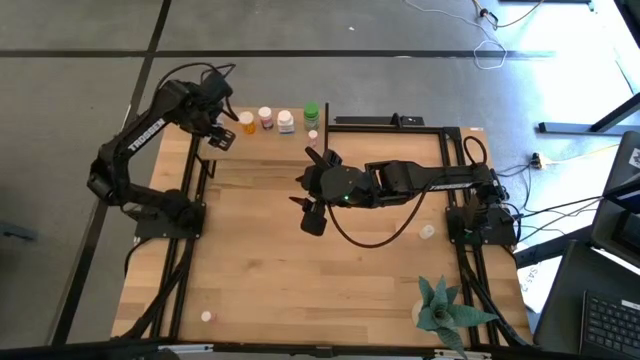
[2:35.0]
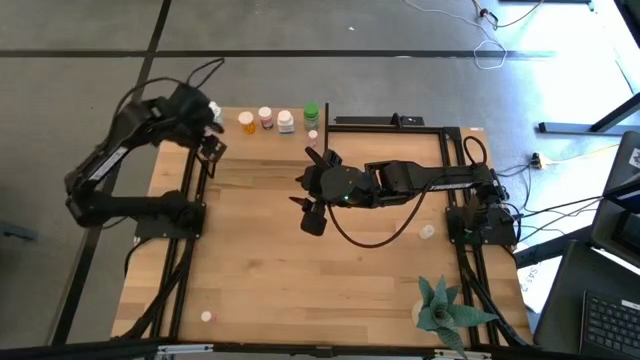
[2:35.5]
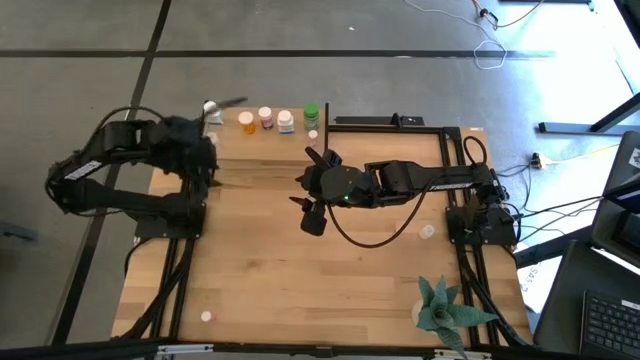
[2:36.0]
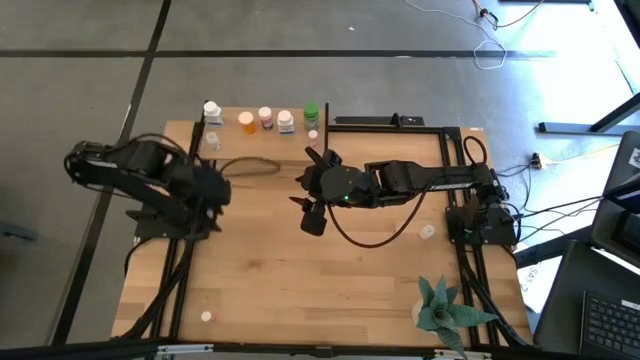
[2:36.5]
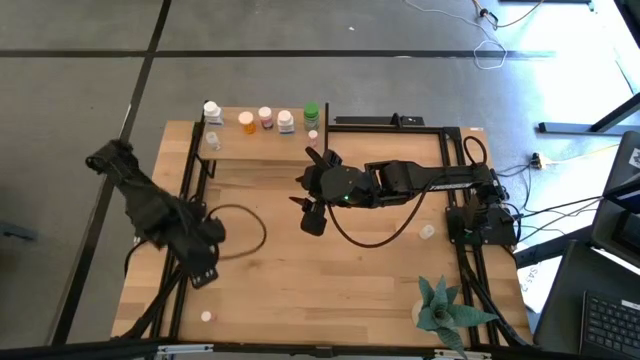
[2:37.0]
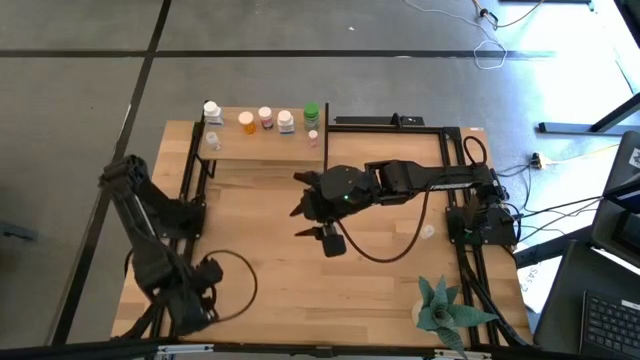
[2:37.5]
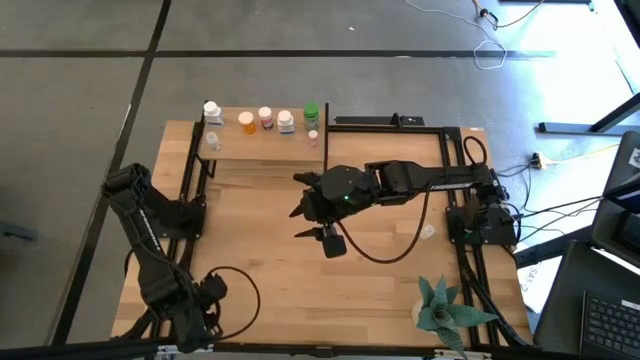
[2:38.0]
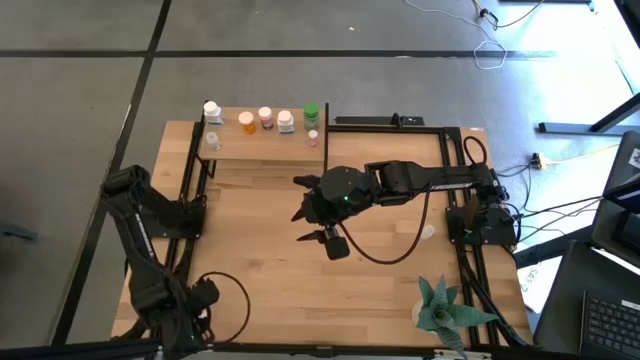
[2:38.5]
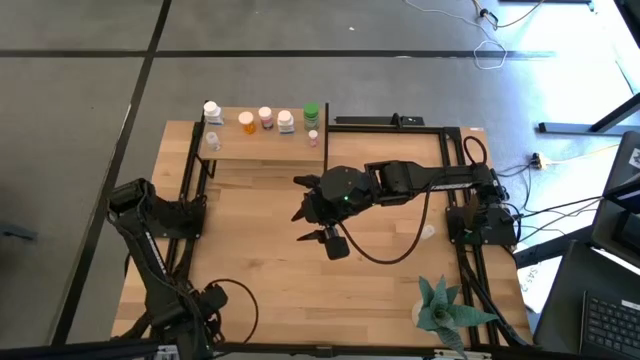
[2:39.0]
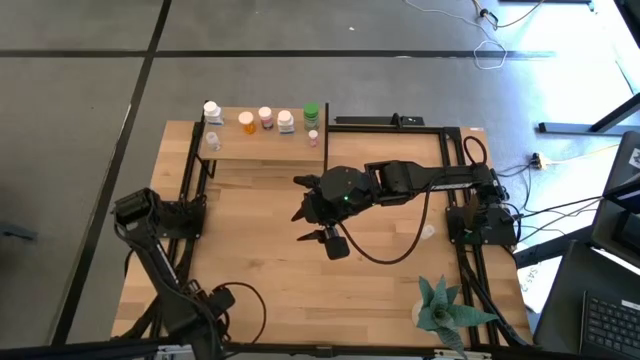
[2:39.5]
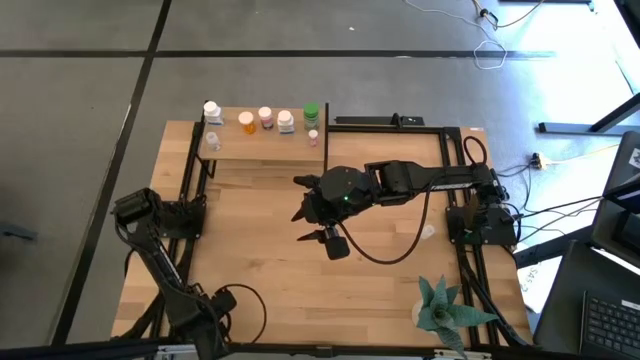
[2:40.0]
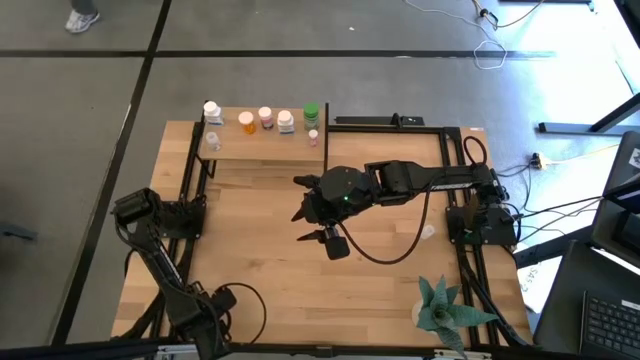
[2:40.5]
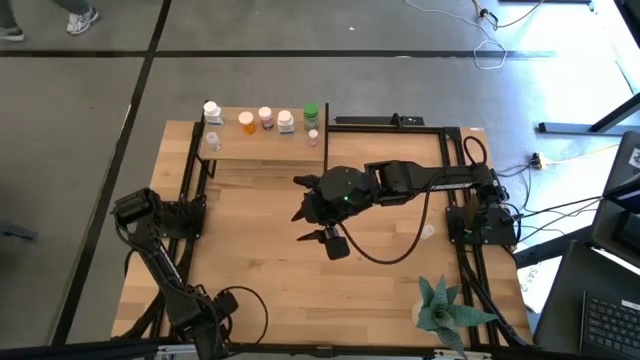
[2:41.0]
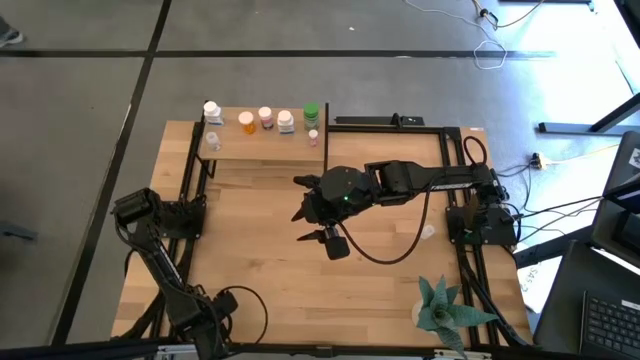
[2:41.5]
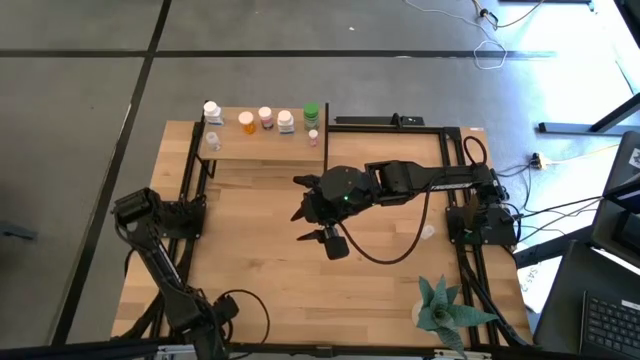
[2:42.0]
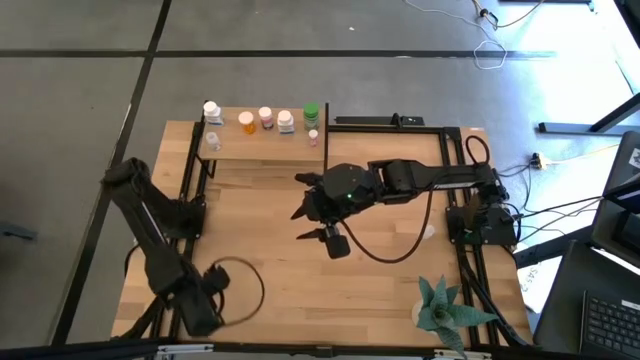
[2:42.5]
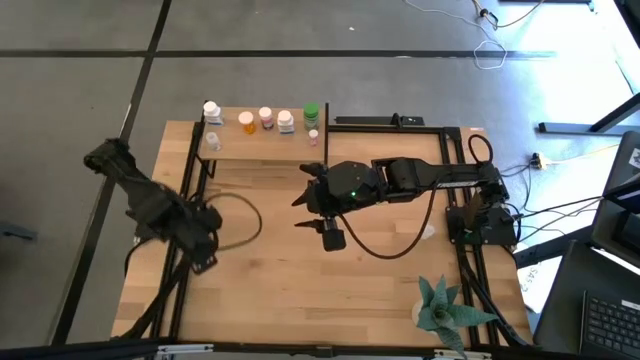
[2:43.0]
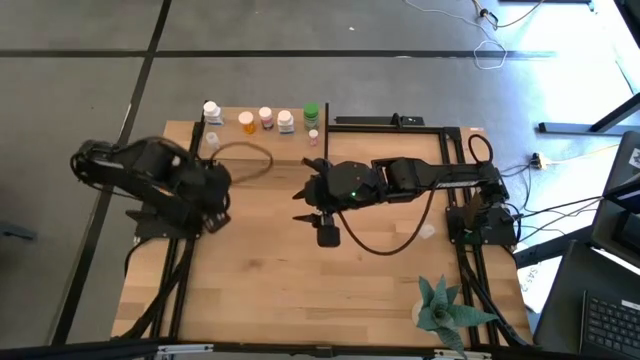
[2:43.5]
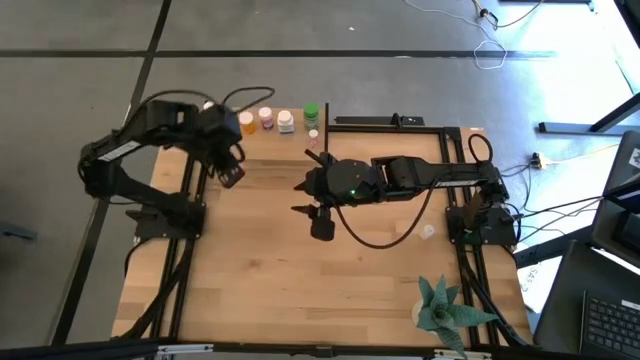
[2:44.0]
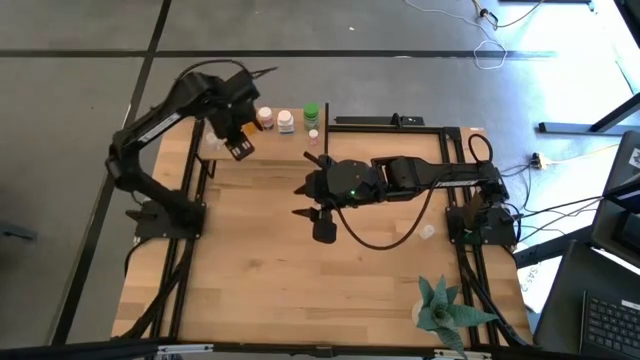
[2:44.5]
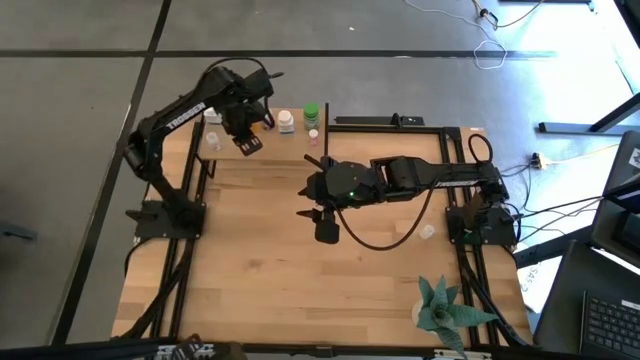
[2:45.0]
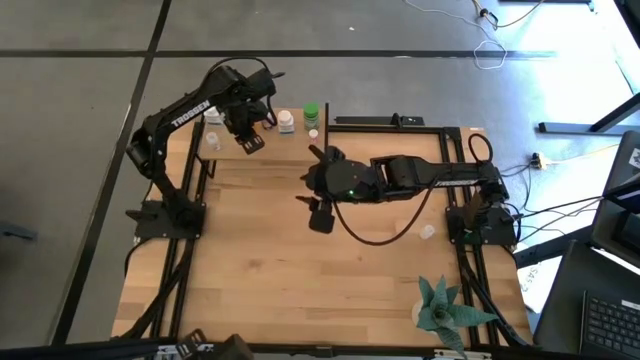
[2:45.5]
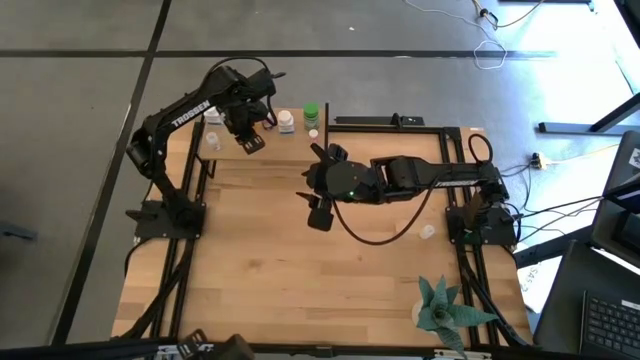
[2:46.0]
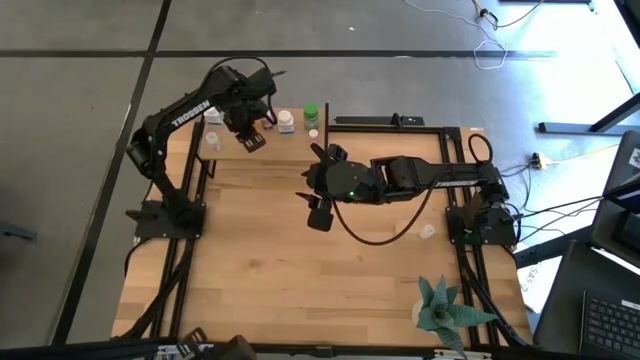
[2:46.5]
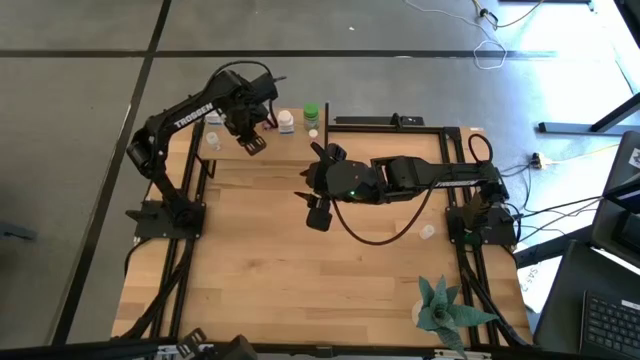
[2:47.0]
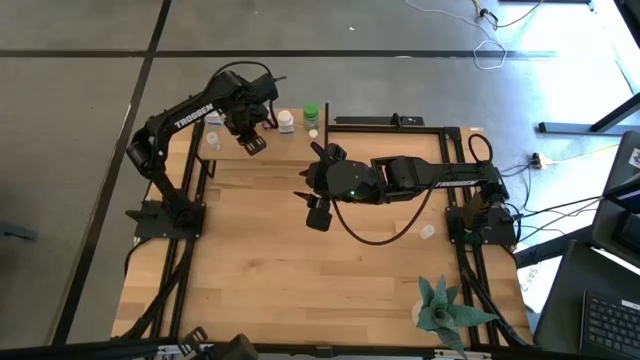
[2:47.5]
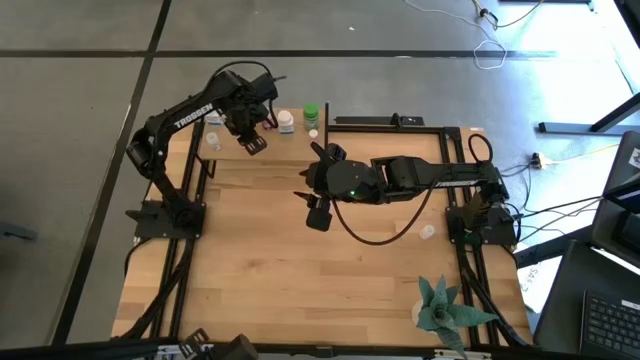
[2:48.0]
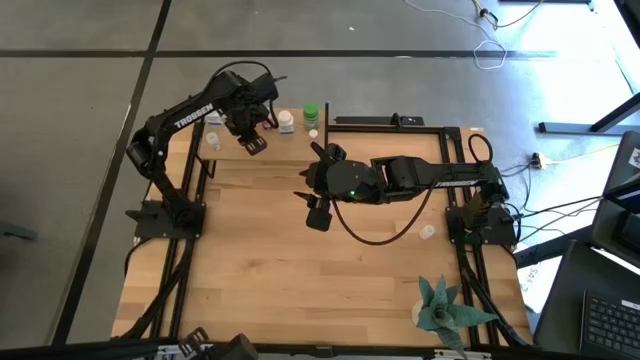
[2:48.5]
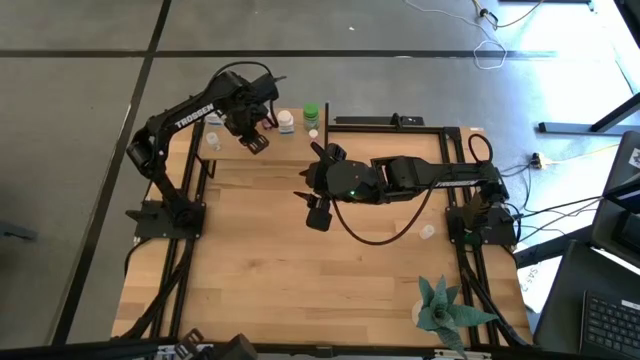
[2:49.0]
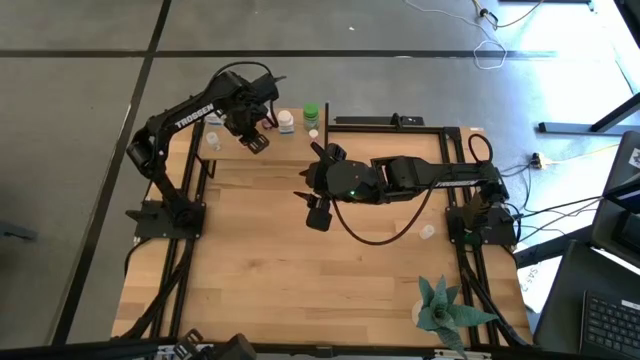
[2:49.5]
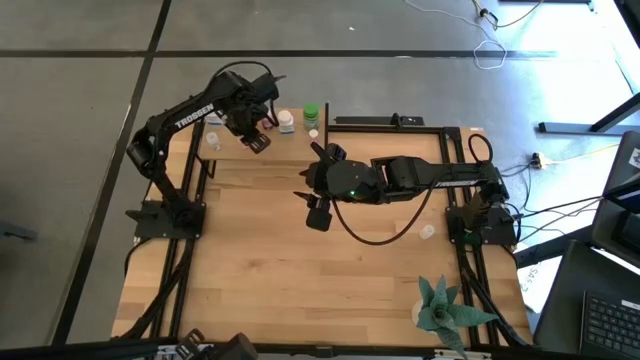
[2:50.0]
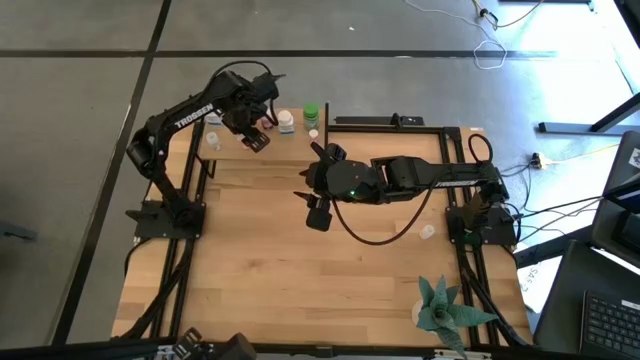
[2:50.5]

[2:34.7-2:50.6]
Task: Pick and place medicine bottles onto shelf by color
Put the pink pill bottle on the shelf

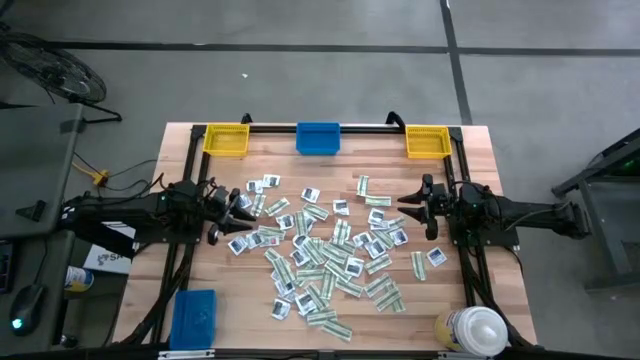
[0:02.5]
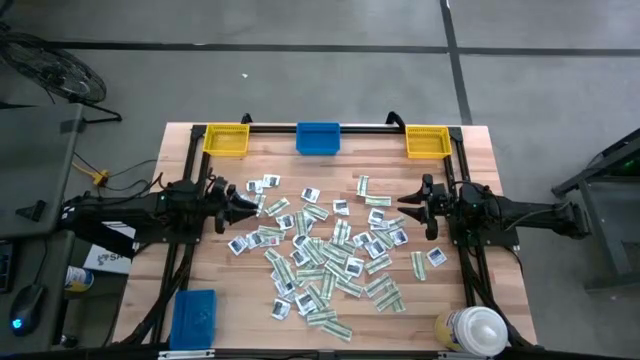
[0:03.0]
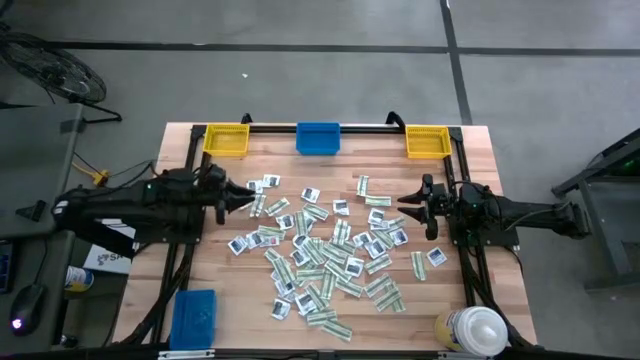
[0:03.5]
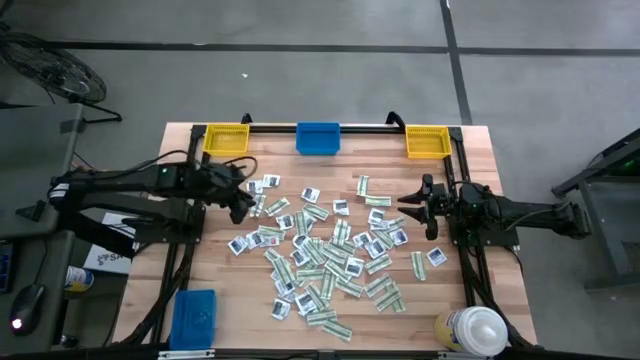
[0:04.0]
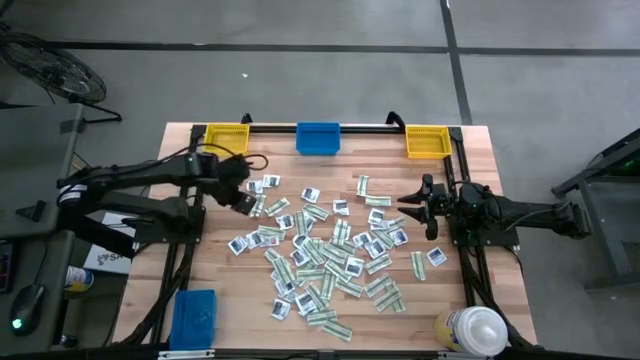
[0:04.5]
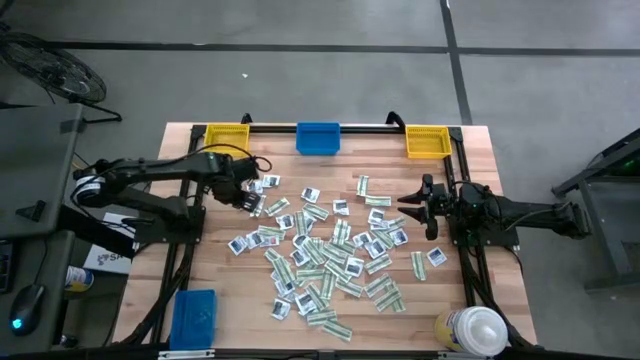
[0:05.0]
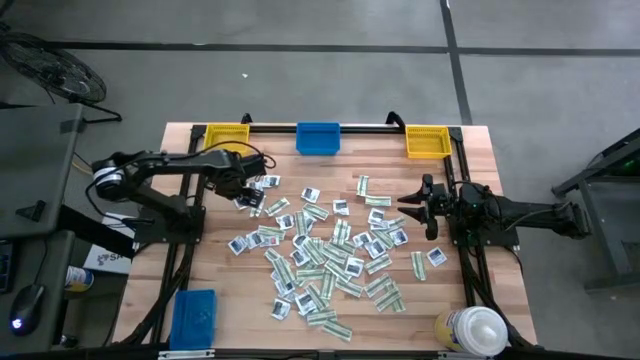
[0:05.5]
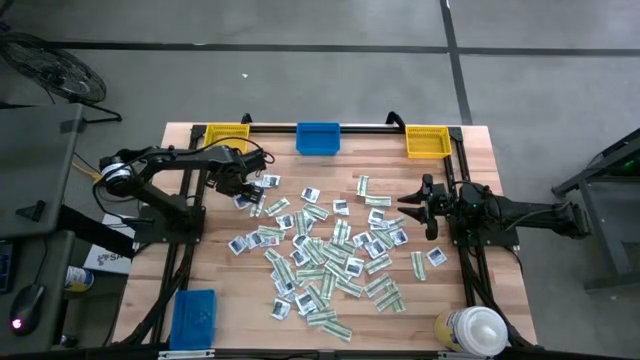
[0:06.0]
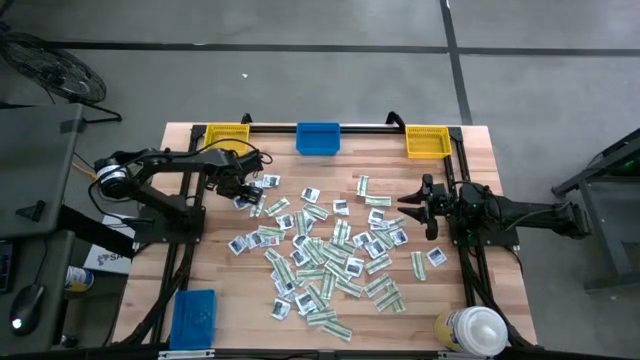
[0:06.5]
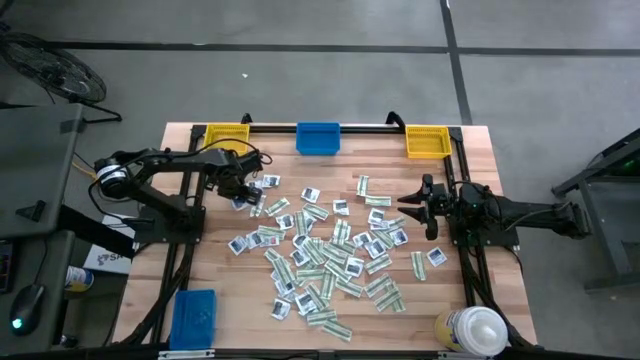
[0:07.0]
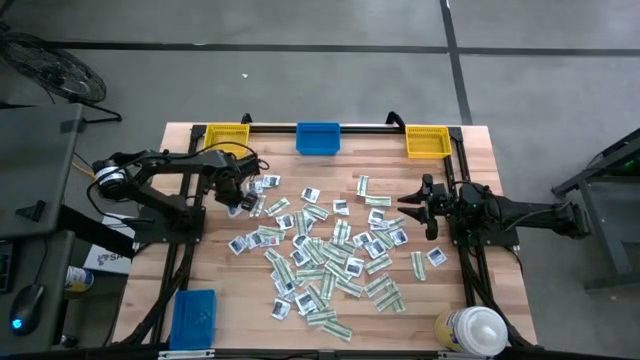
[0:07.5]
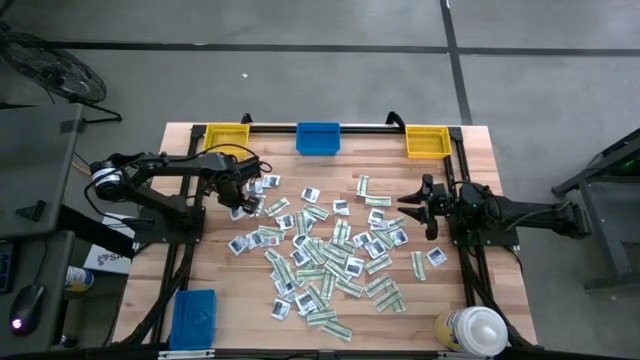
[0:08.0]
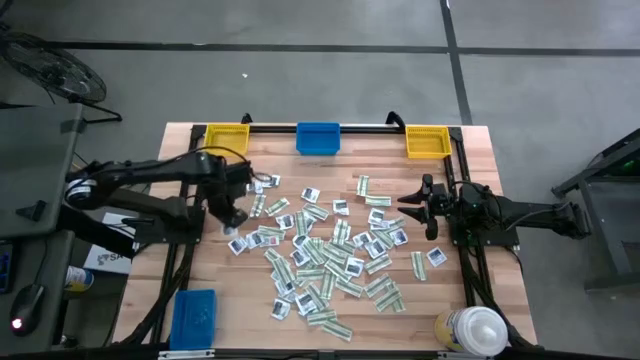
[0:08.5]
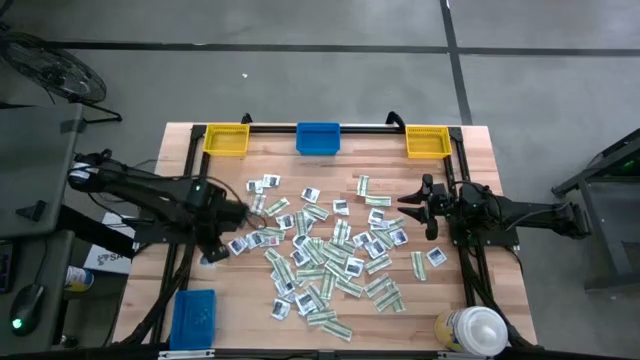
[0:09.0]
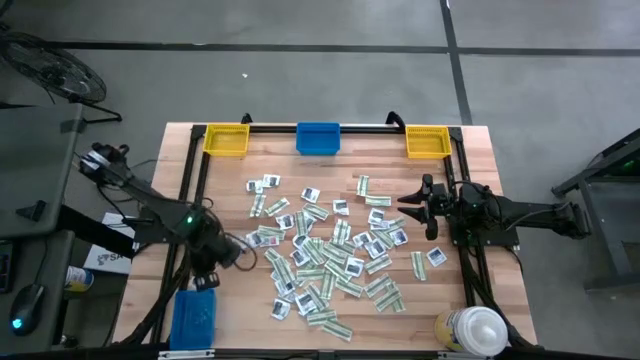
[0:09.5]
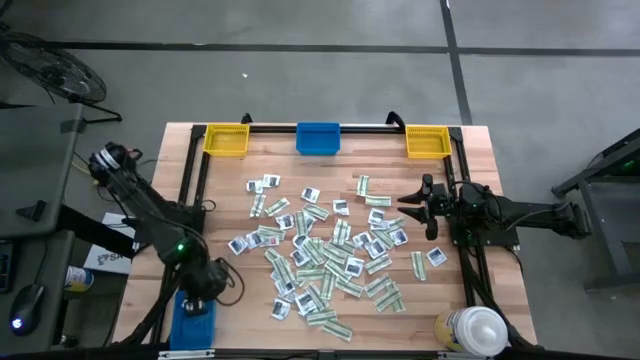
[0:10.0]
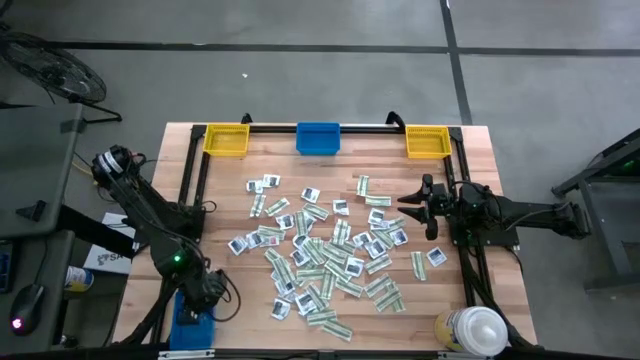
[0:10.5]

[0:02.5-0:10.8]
Task: Pick & Place First Aid Supplies
Put the blue alcohol pad into the bottom blue bin
